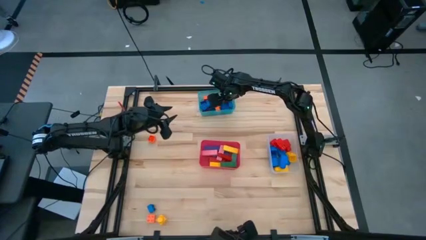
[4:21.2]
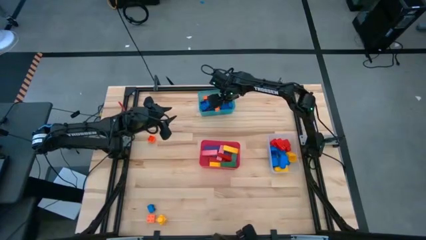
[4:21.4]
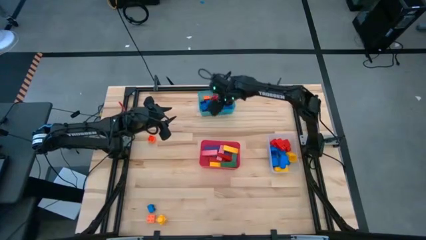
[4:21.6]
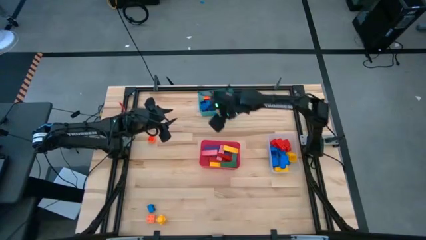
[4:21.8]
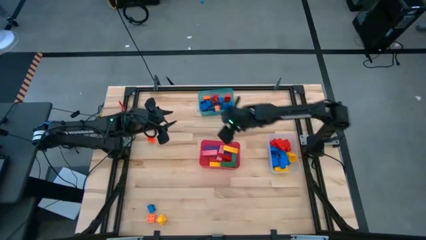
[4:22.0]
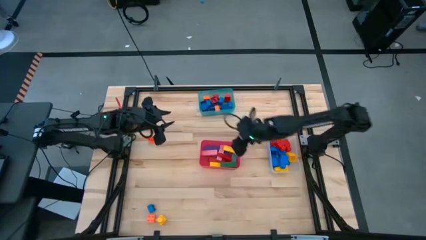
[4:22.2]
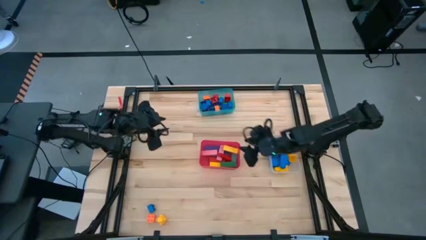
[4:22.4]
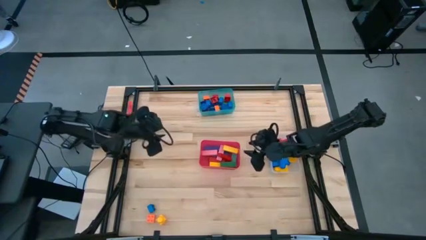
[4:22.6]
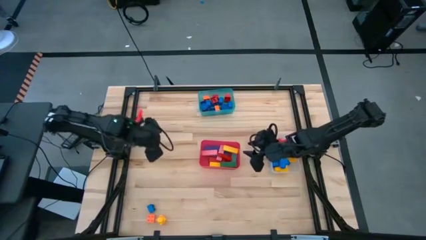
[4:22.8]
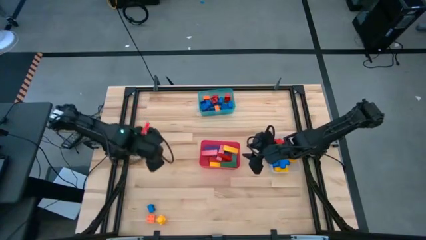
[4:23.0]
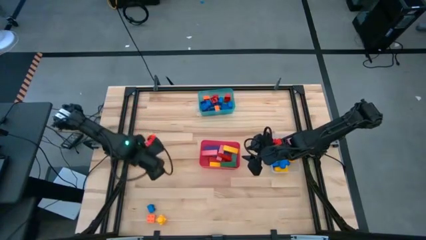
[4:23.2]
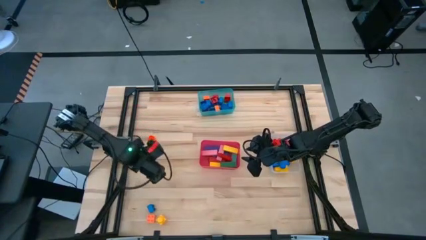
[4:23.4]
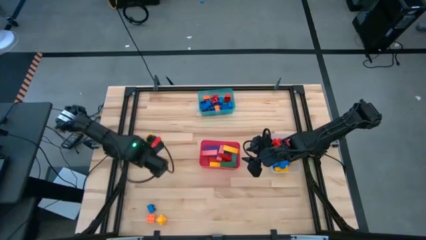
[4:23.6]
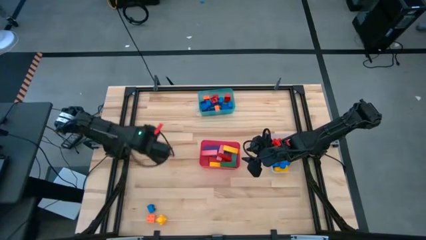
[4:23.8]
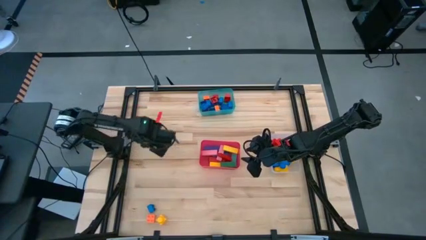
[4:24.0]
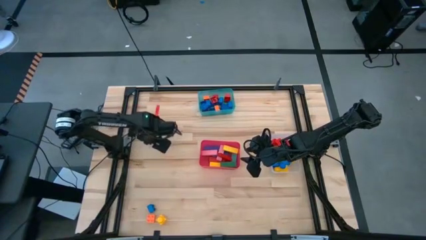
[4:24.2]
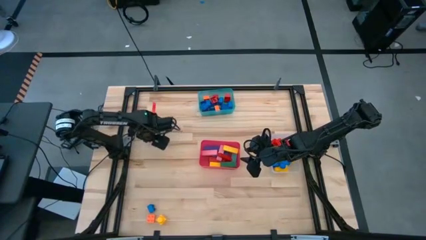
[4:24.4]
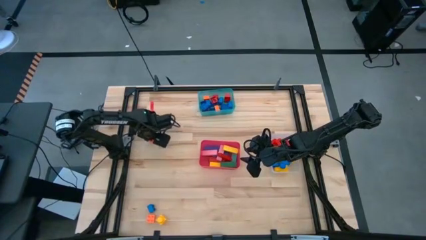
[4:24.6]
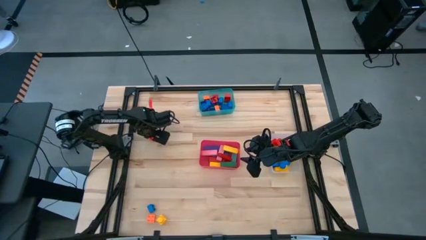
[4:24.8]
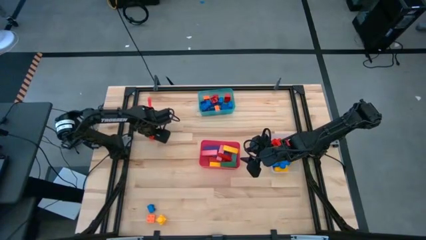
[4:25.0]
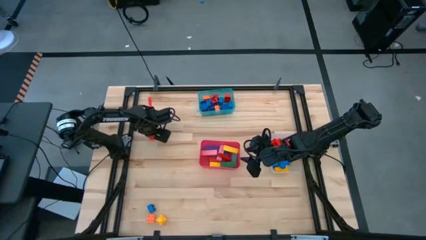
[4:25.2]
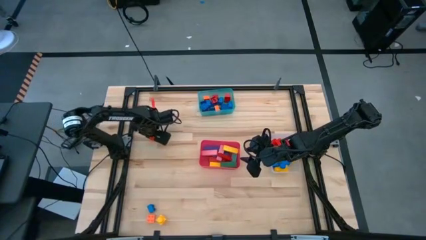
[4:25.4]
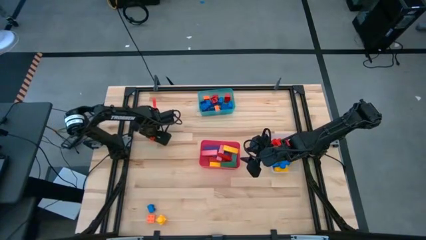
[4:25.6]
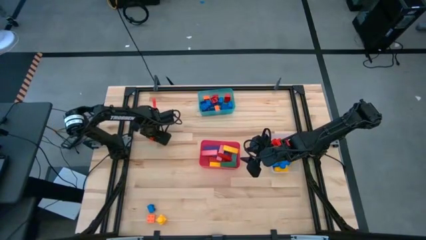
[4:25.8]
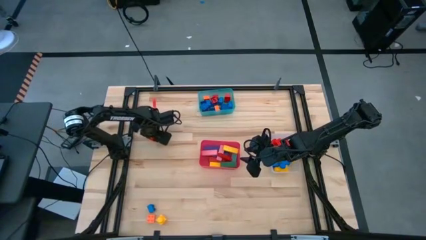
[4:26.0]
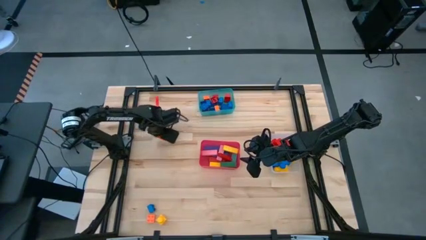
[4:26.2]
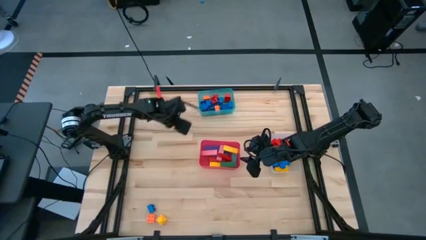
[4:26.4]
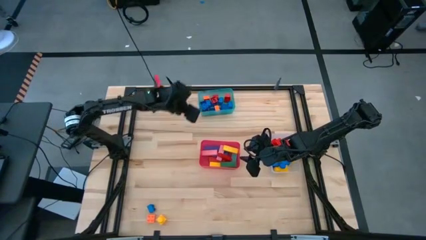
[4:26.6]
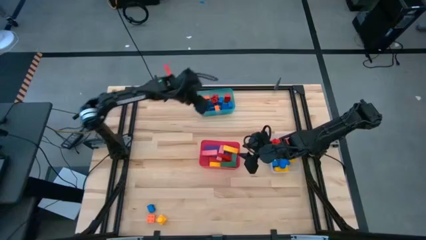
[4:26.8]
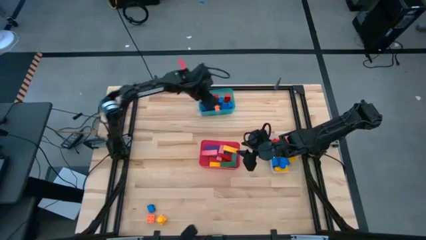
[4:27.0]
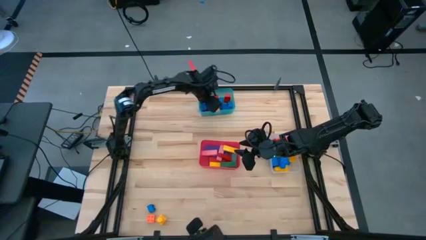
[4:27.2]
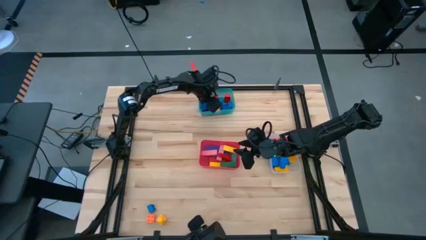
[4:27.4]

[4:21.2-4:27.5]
Task: Sort blocks by size
Put the orange 4 stud game piece into the red bin

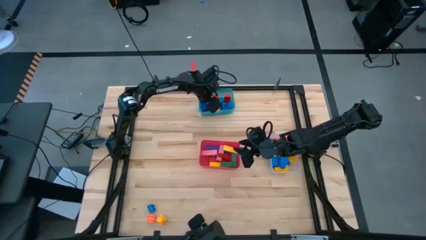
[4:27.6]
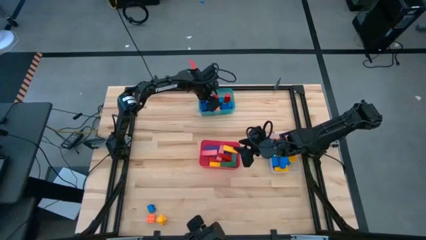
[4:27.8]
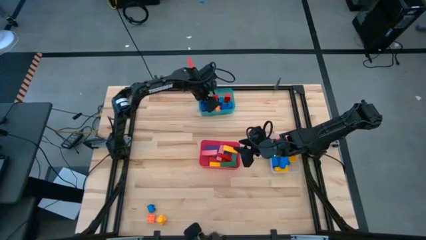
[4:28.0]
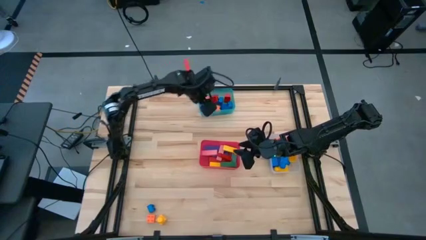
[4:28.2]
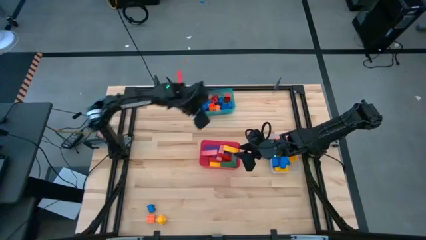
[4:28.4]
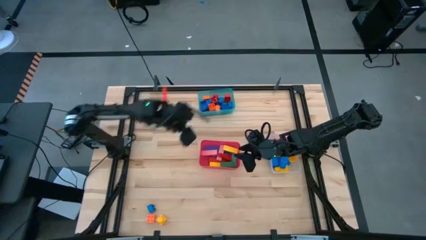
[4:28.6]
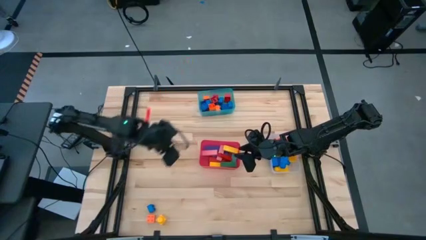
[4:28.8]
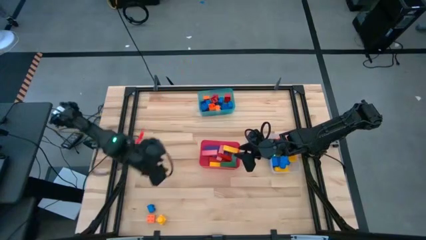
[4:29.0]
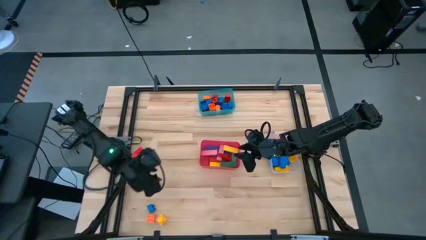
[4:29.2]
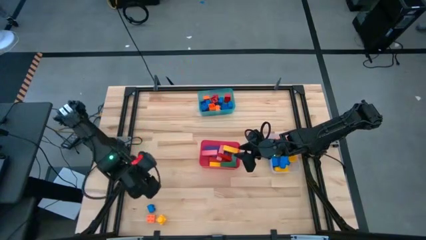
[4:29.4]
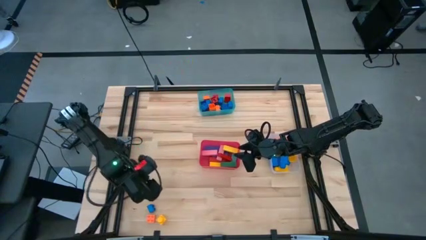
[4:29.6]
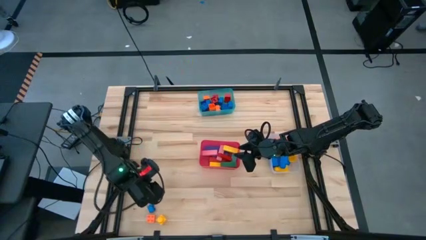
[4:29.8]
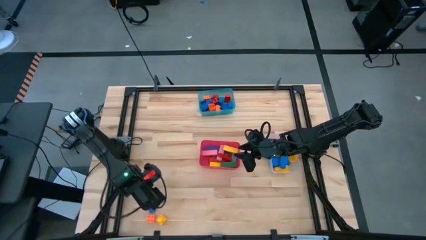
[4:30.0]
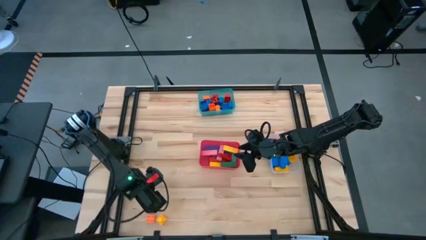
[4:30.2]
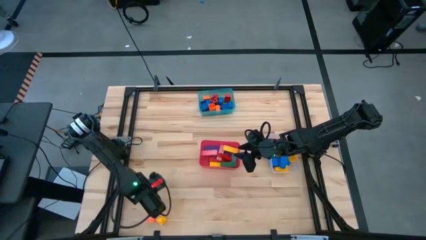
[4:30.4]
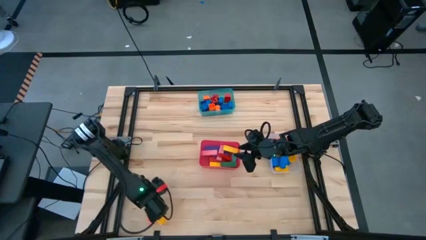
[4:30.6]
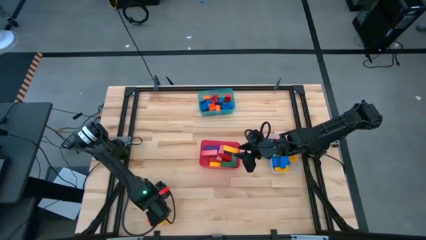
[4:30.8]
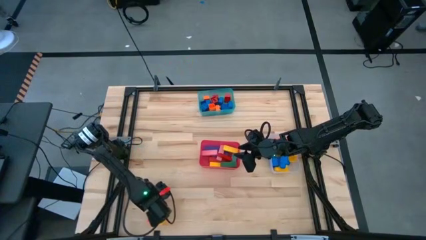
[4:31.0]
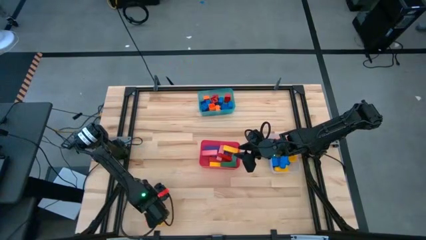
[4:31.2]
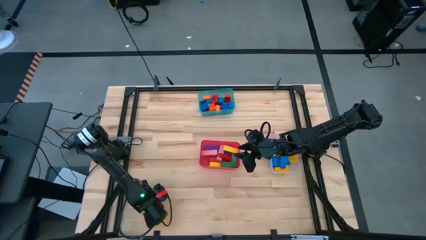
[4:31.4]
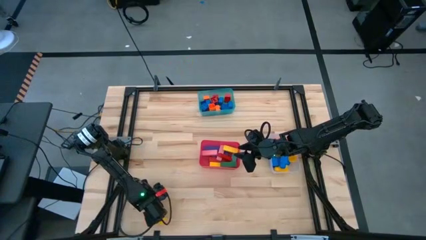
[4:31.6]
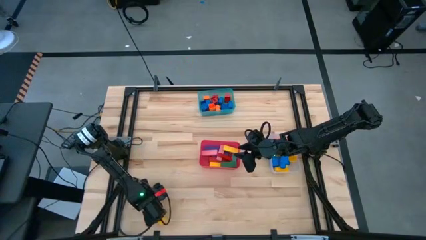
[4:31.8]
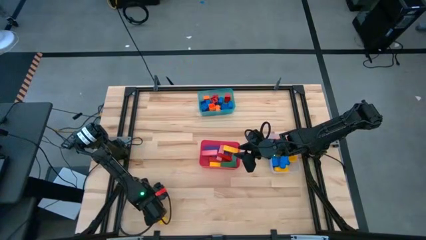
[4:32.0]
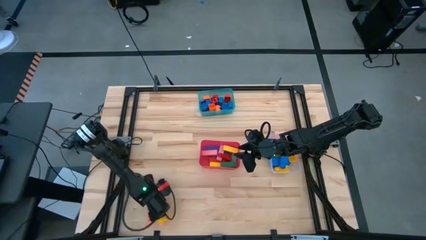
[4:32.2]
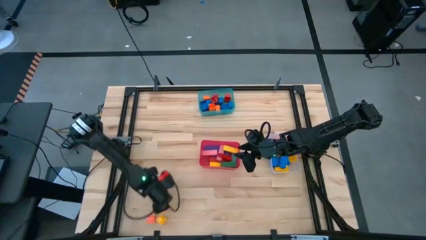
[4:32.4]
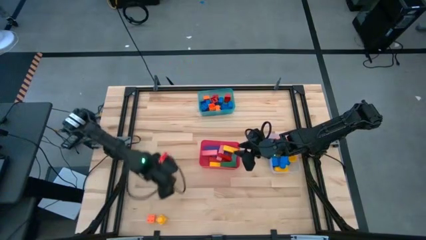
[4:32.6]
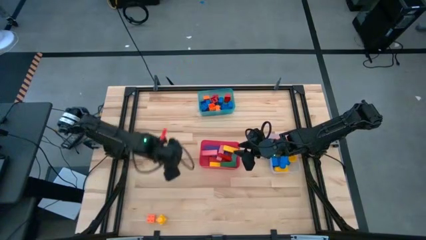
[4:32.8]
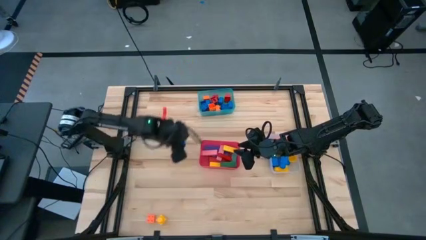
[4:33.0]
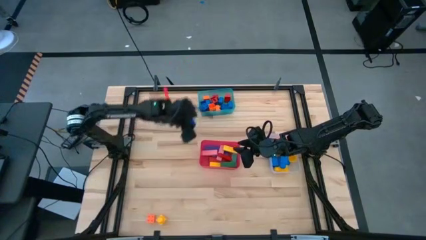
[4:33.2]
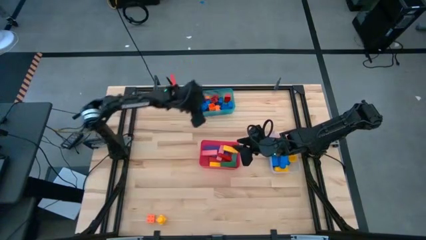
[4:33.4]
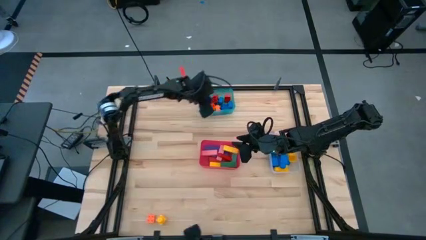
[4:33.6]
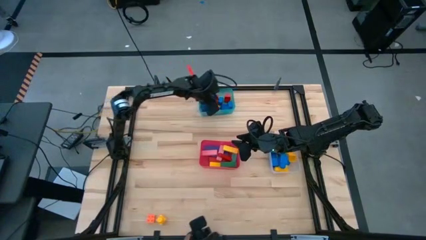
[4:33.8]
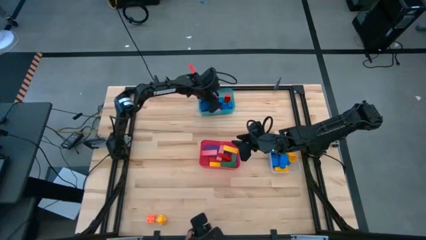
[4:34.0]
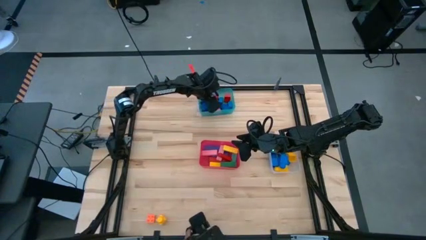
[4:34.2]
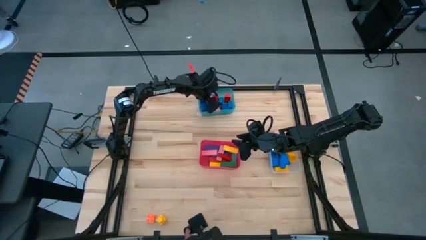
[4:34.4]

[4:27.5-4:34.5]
Put the blue 4 stud game piece into the blue bin

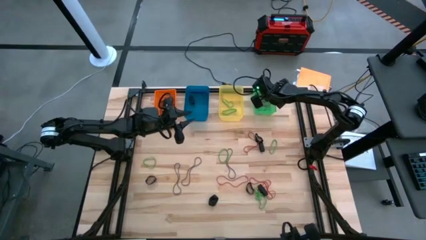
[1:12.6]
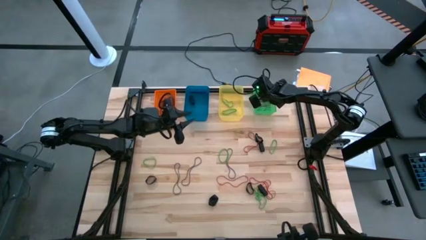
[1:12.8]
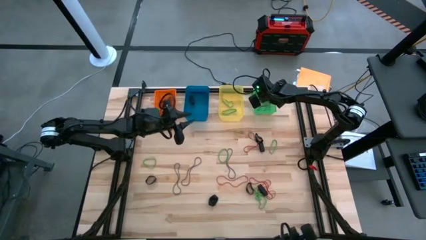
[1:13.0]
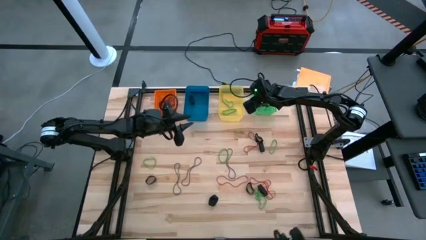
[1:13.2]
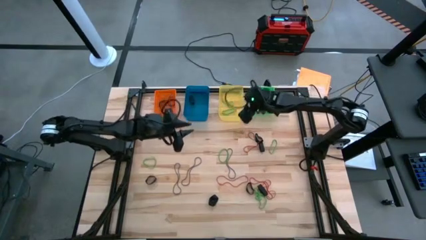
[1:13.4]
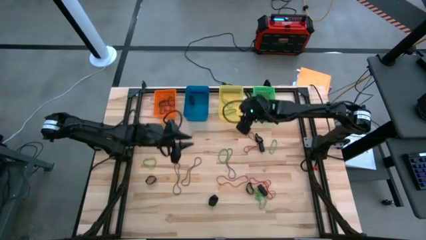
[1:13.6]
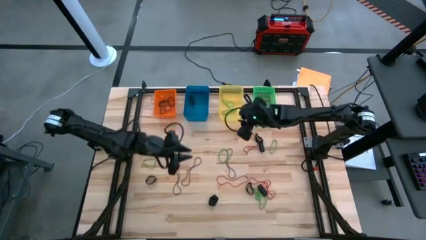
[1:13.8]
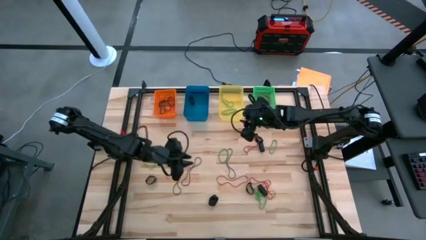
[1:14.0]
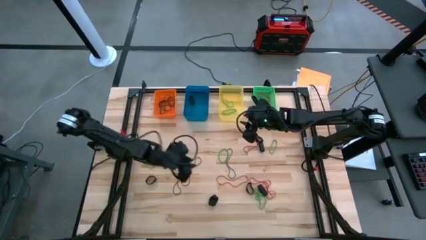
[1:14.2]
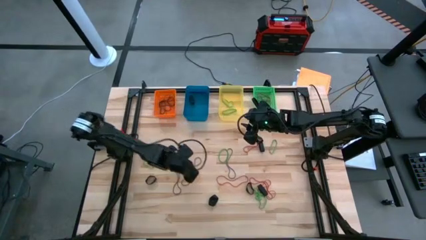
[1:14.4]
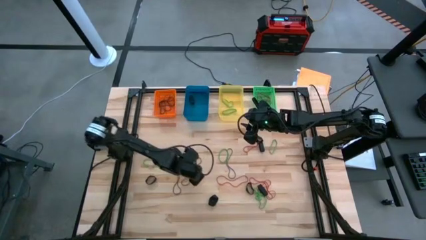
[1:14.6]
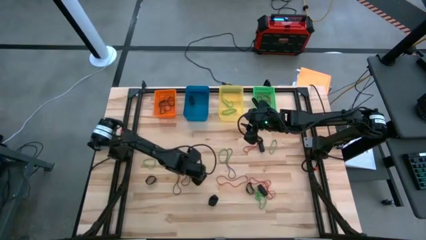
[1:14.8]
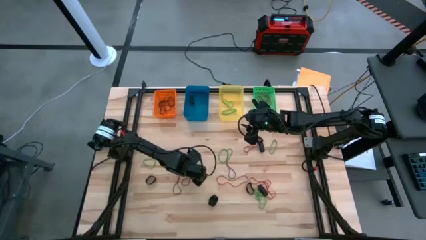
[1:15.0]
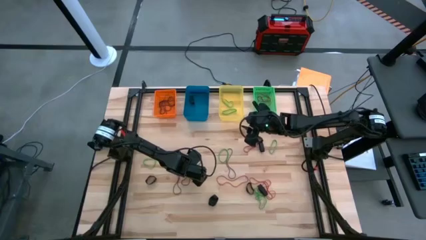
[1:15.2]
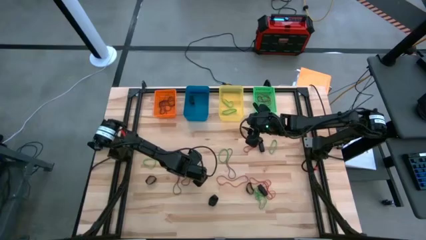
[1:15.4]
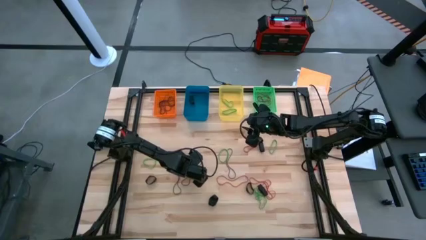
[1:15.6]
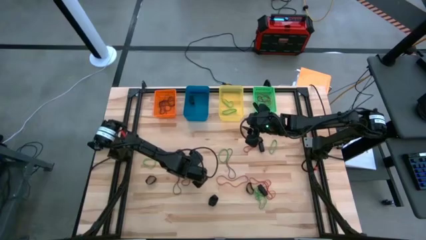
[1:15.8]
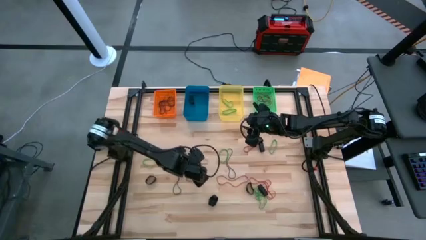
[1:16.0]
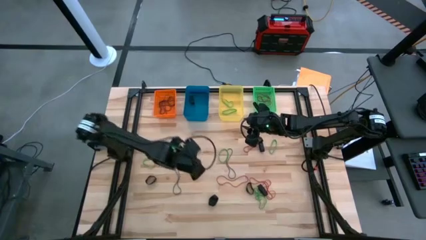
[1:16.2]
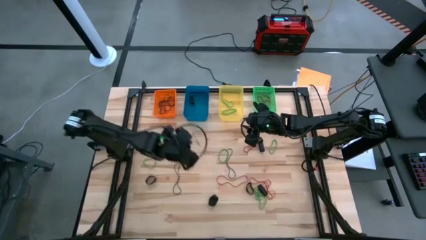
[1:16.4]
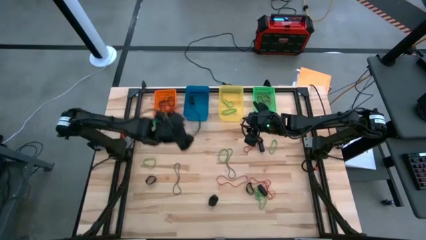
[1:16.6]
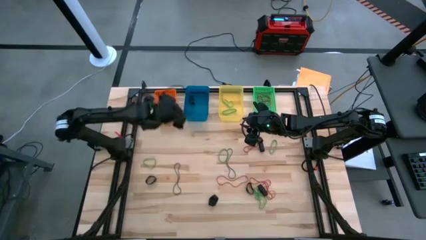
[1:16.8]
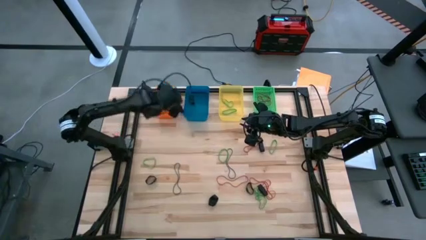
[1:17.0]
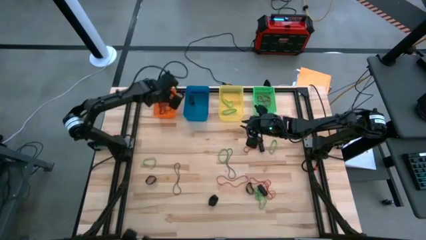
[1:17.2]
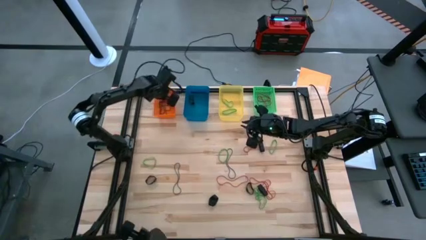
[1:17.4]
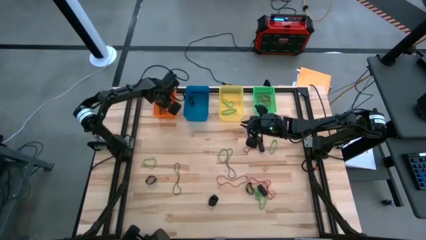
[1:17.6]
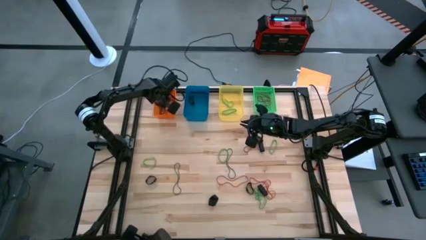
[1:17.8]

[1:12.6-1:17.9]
Task: Sort rubber bands into baskets
Put the red rubber band into the orange bin
